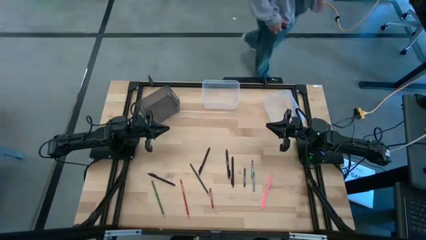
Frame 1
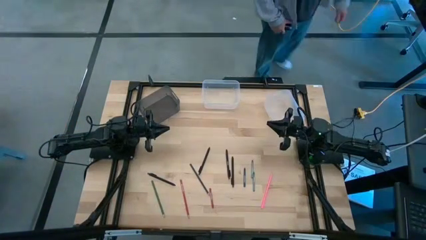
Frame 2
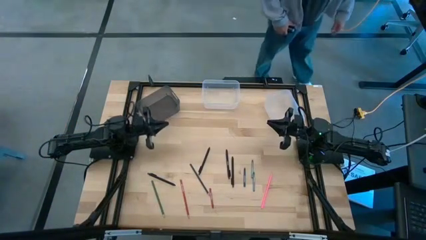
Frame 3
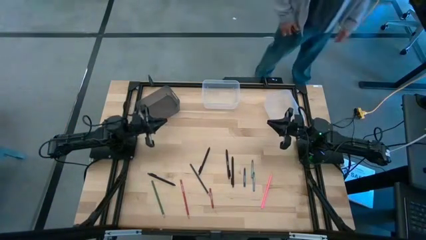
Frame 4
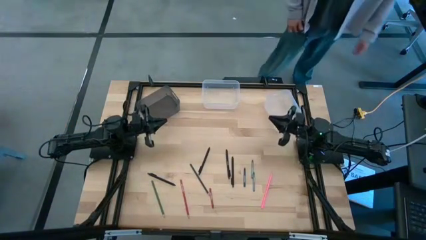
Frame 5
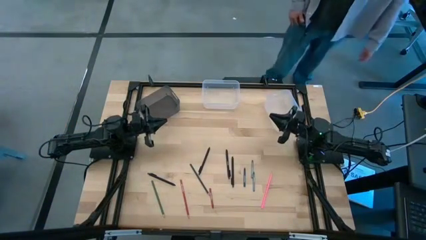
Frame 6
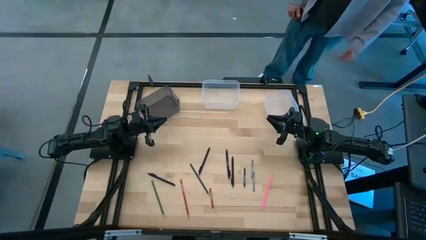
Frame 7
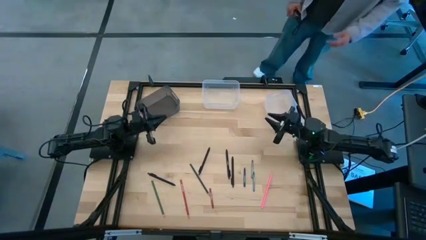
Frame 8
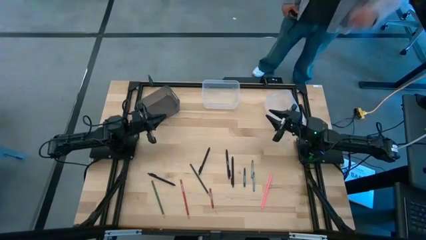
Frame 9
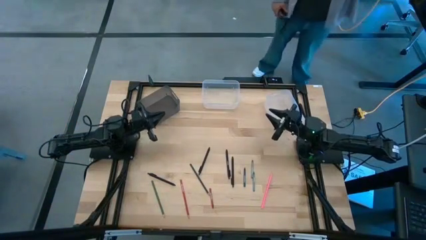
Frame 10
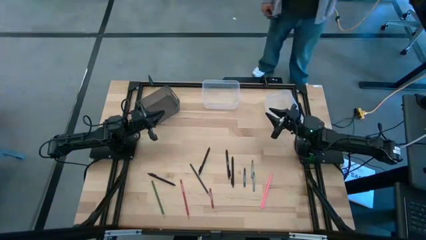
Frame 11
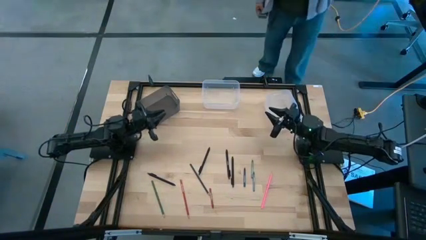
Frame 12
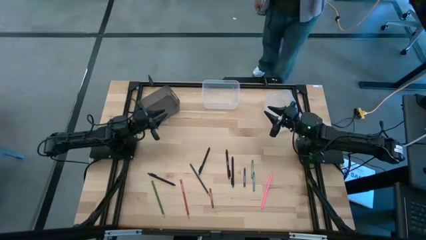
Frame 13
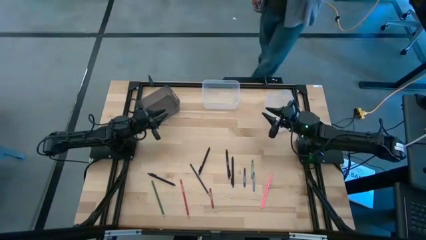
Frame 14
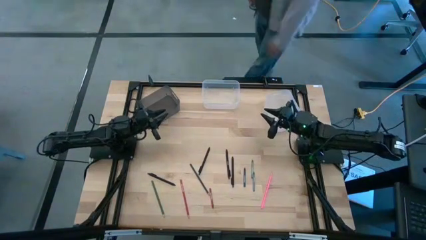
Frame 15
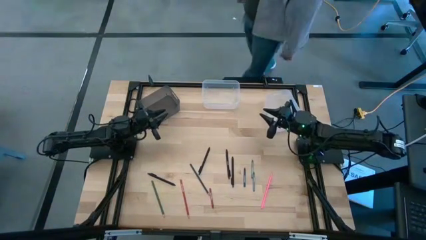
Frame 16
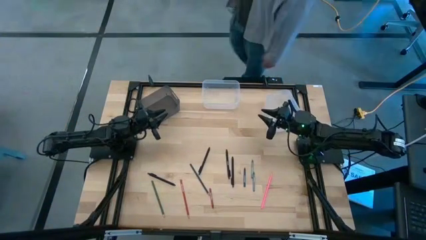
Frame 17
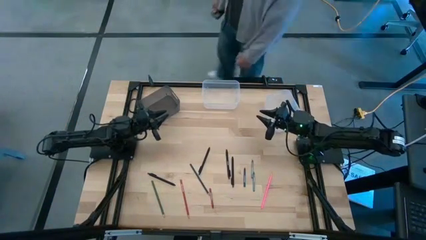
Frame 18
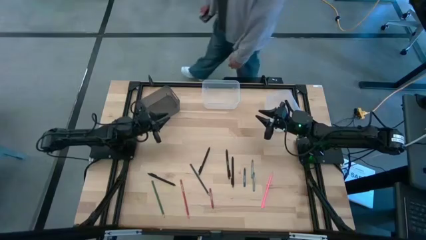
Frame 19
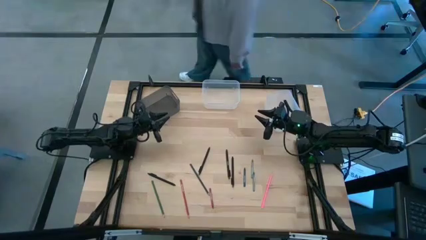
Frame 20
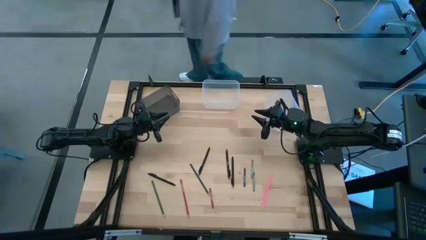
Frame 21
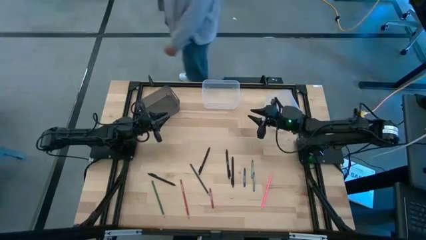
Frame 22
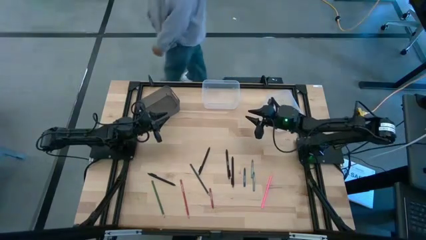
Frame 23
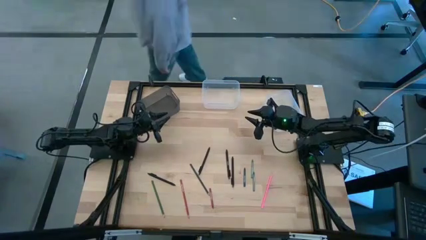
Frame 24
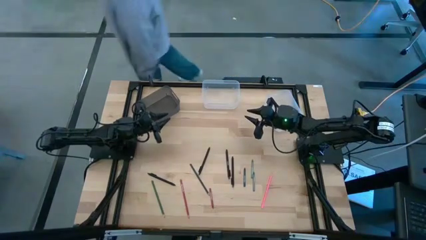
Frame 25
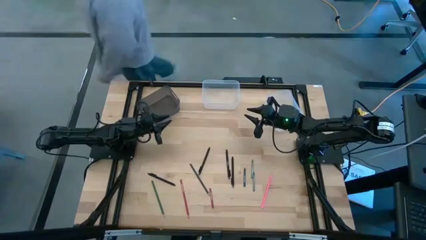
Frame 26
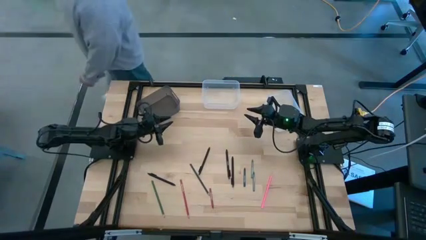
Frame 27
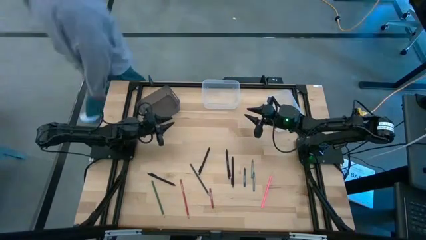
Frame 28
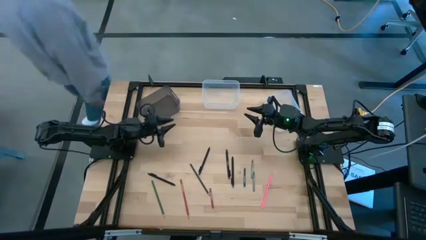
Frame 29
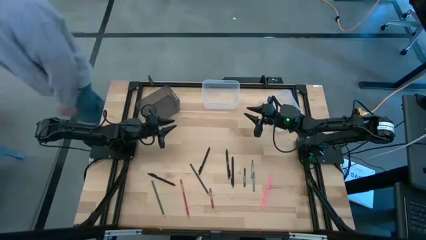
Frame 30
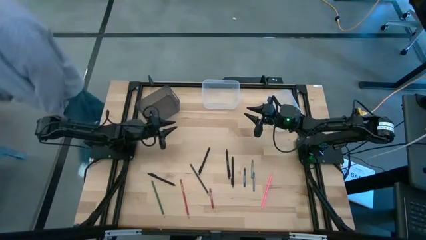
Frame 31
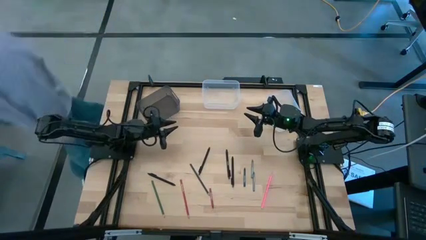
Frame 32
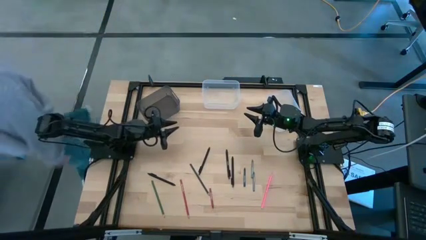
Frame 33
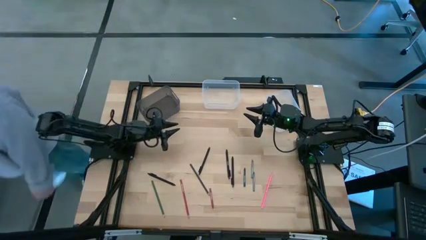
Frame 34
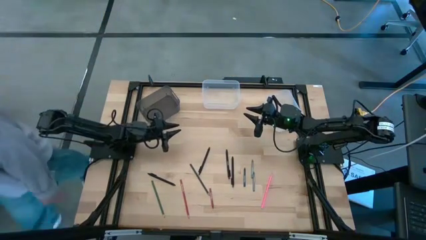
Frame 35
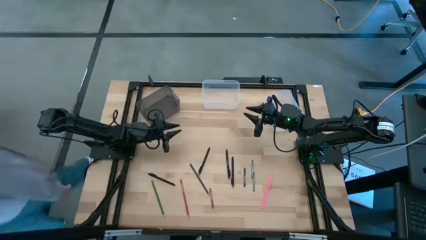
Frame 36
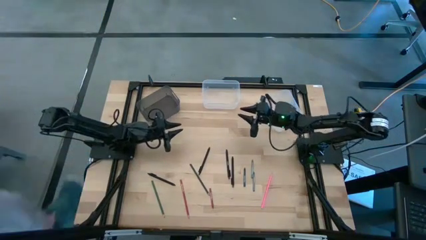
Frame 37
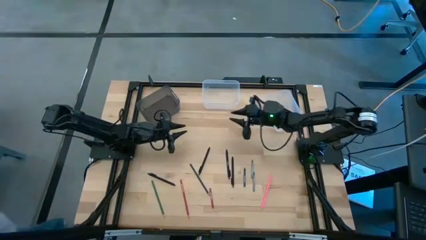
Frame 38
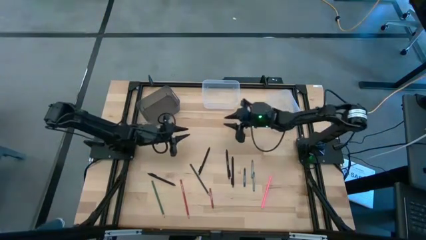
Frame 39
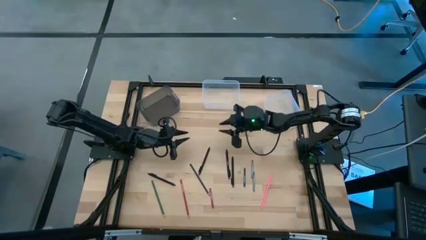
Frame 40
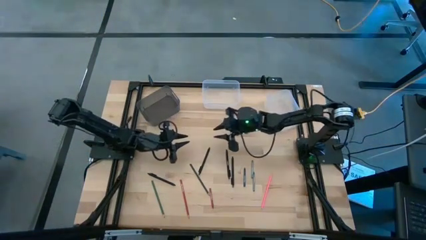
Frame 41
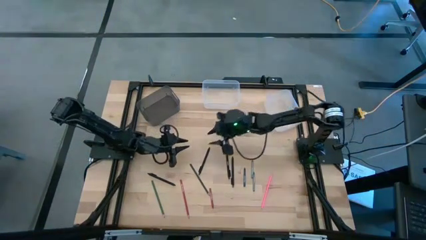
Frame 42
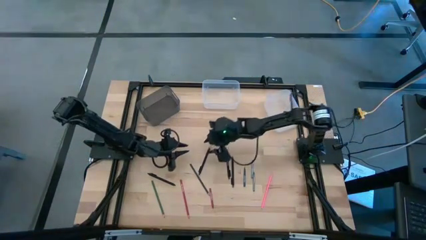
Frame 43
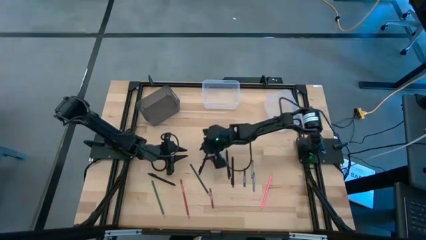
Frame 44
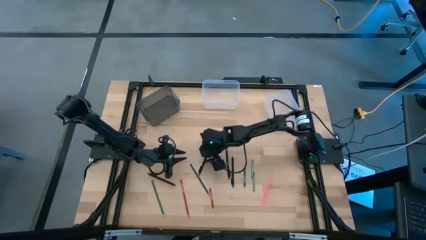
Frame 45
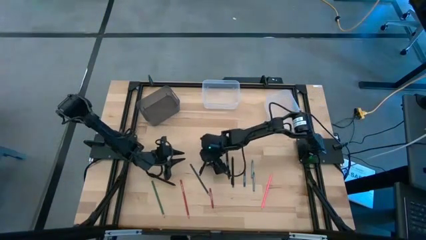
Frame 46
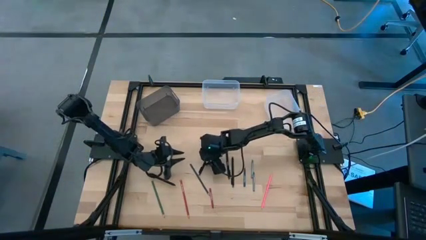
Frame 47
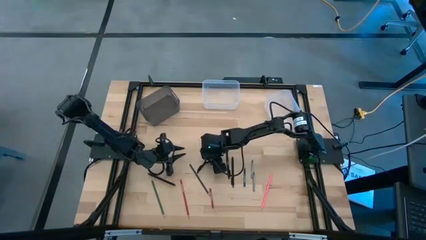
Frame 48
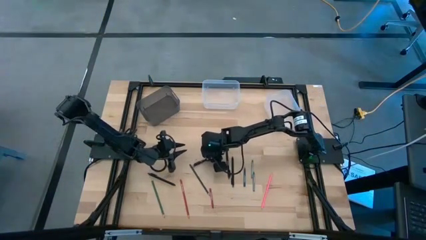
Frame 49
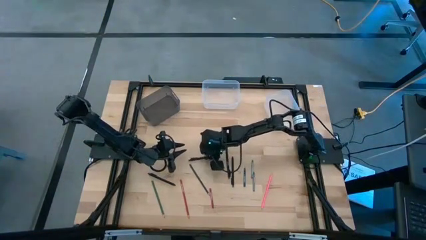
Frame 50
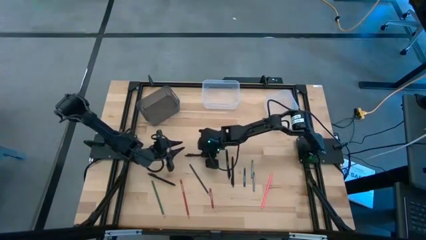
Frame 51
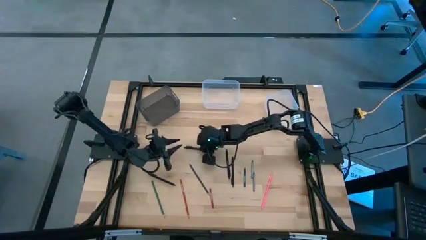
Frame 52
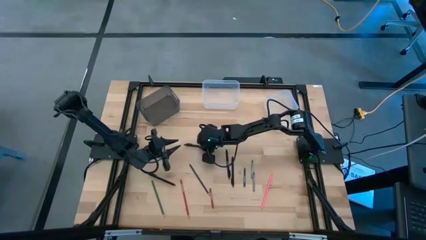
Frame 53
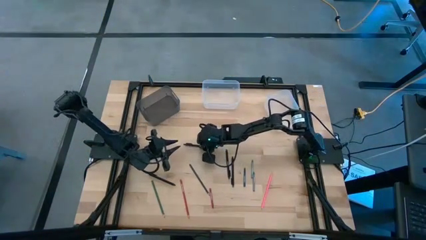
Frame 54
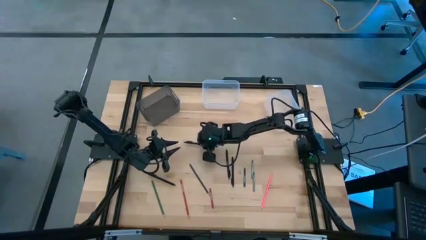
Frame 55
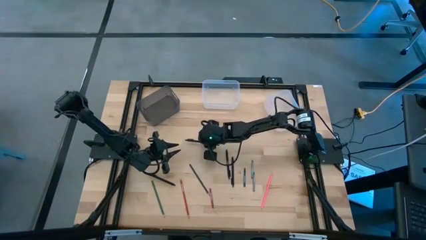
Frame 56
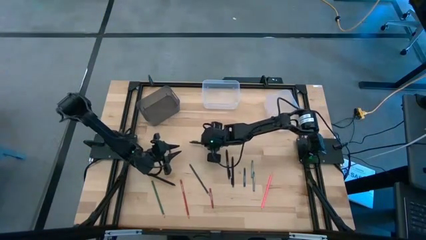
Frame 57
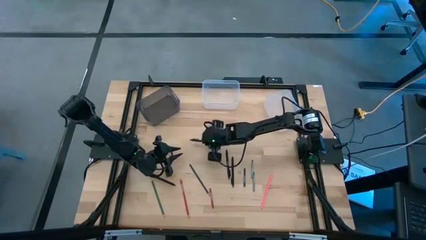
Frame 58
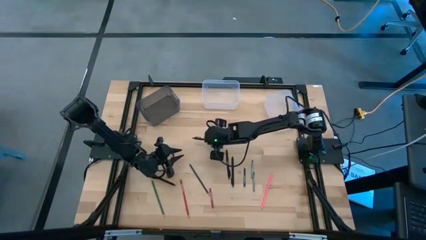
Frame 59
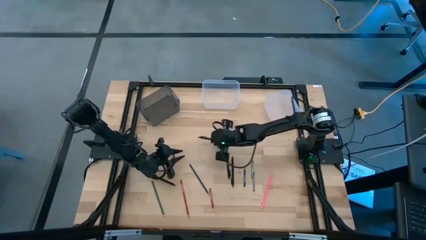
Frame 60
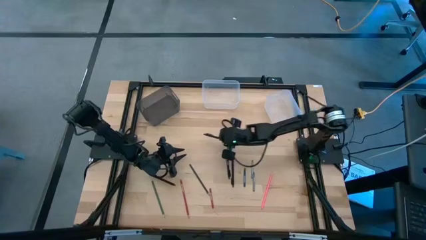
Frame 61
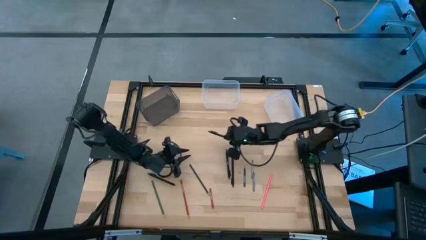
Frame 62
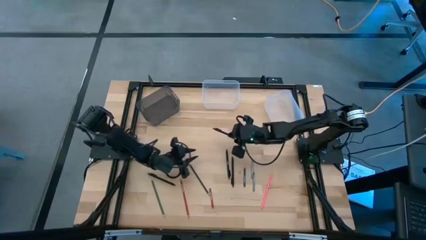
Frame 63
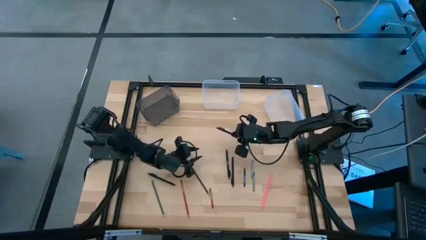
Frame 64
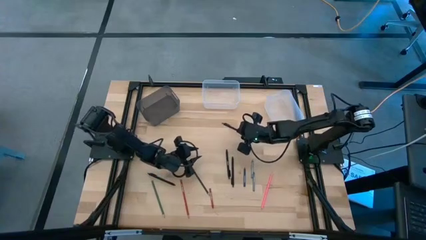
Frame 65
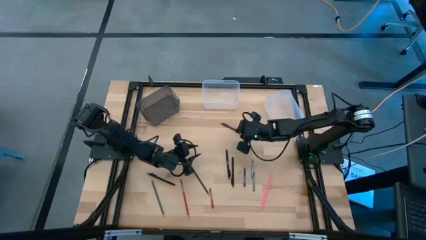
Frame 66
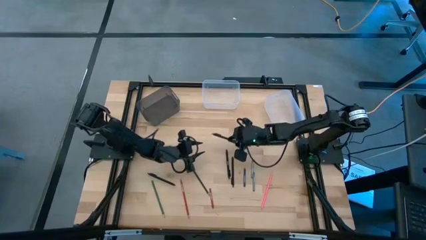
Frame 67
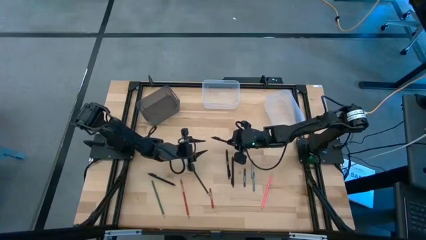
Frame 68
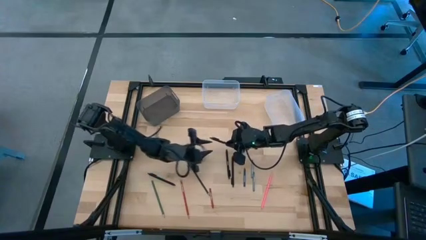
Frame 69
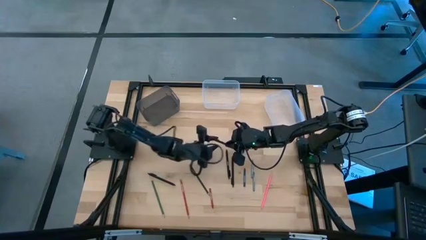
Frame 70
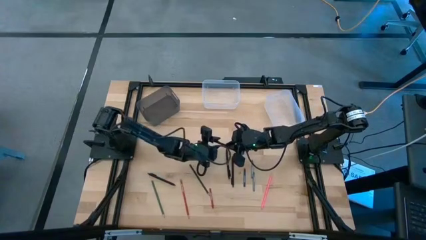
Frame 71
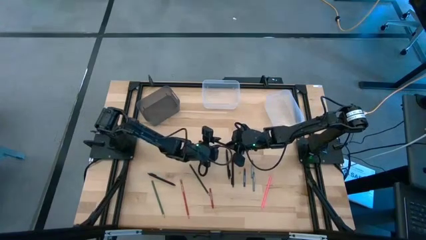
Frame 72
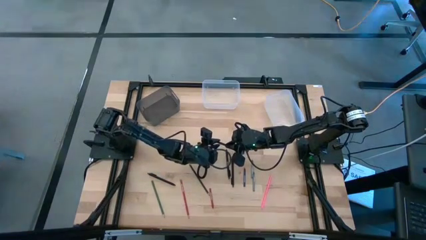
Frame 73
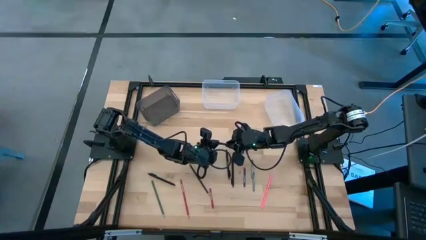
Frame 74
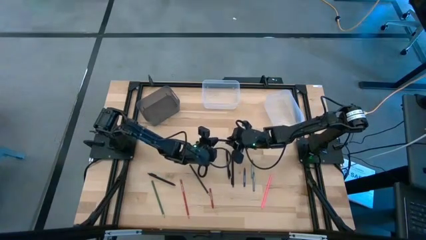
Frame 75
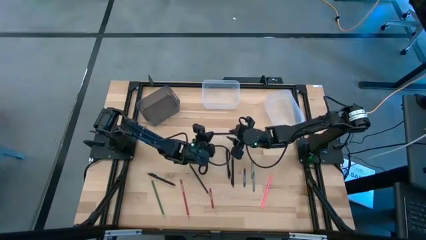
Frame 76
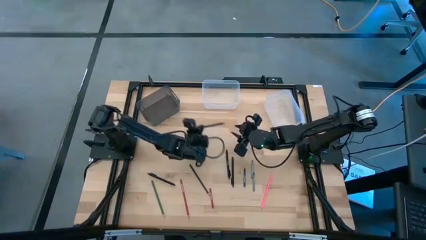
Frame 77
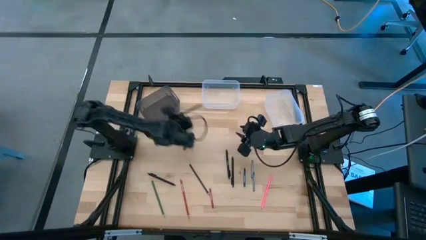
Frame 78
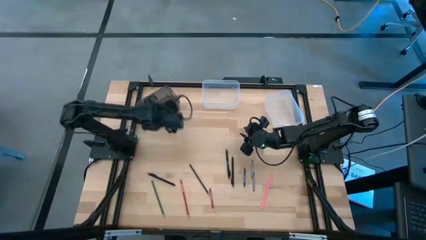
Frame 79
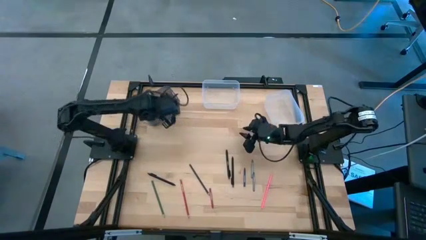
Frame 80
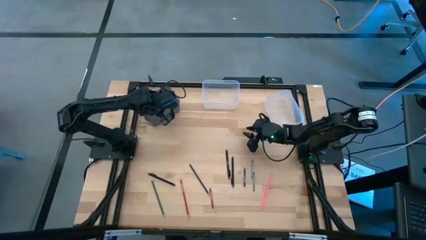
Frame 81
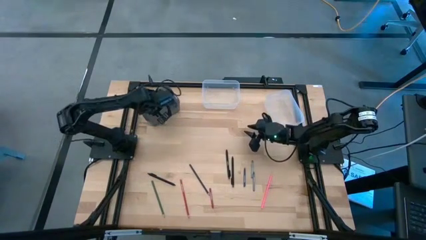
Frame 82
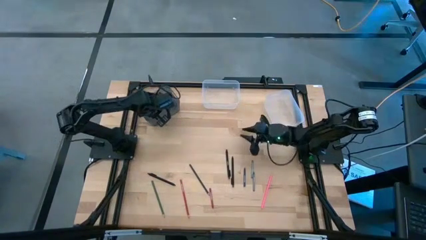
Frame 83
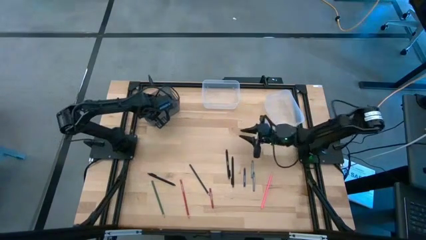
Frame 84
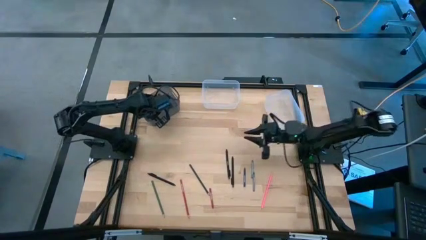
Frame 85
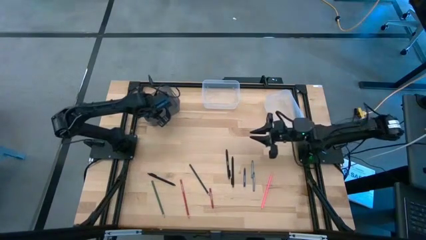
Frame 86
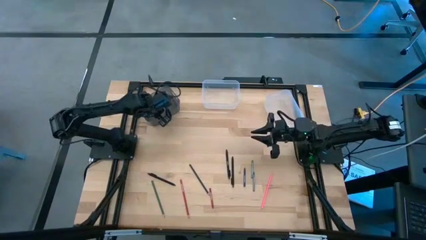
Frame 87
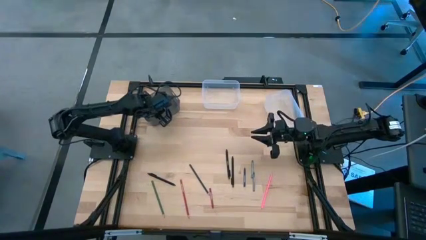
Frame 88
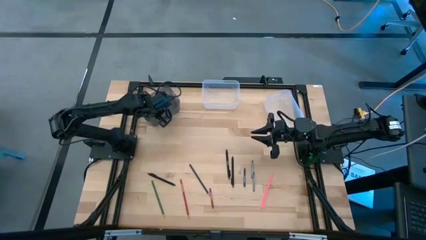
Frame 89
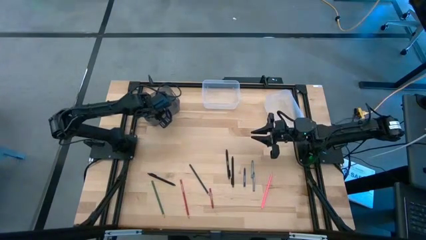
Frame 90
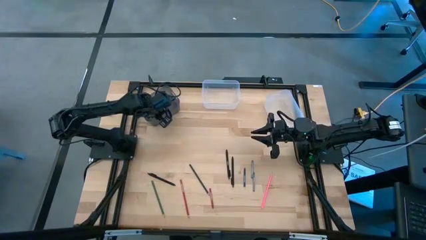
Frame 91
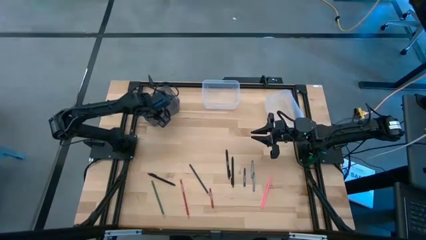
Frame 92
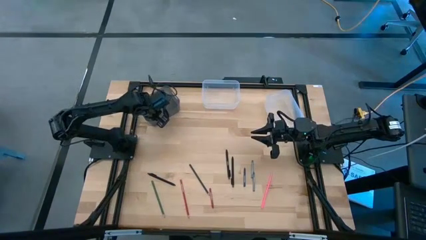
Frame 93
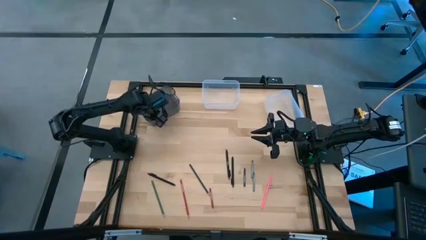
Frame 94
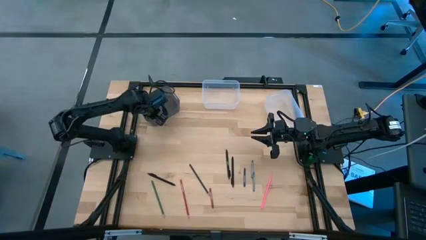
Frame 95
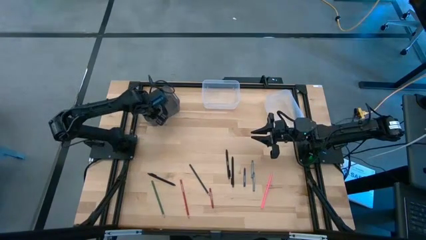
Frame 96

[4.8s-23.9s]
Task: Sort crayons/erasers/pens/pencils in bins
Put the center black pen into the black bin
